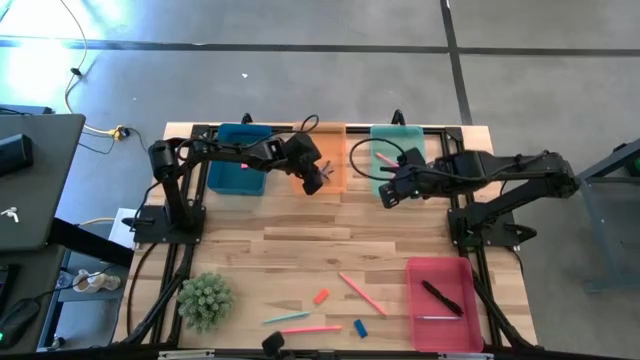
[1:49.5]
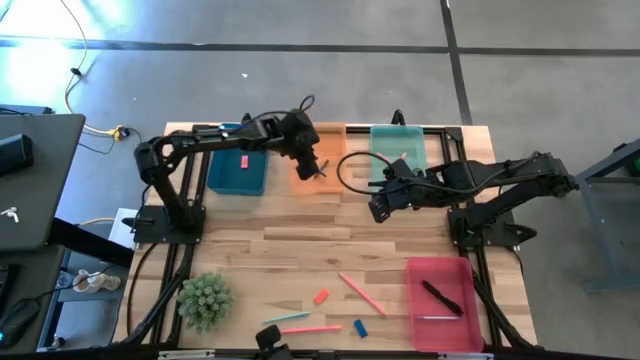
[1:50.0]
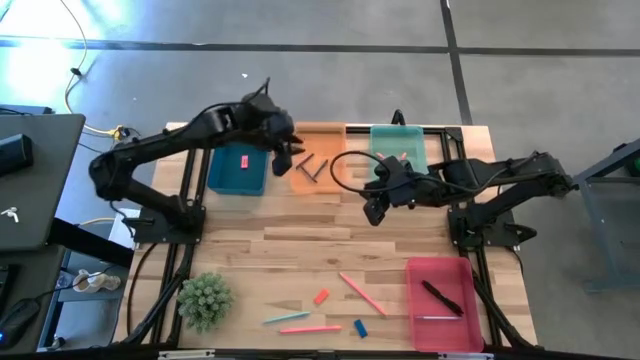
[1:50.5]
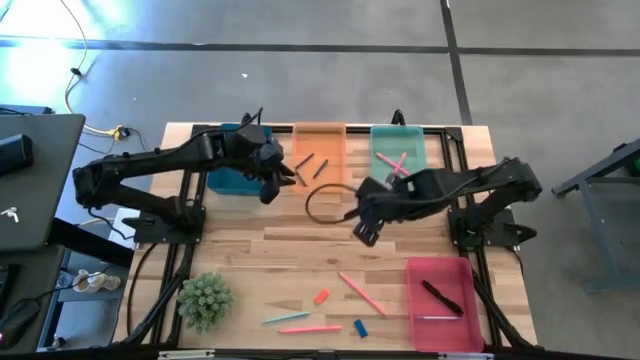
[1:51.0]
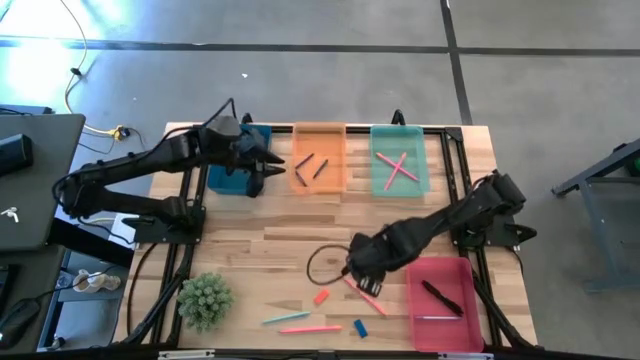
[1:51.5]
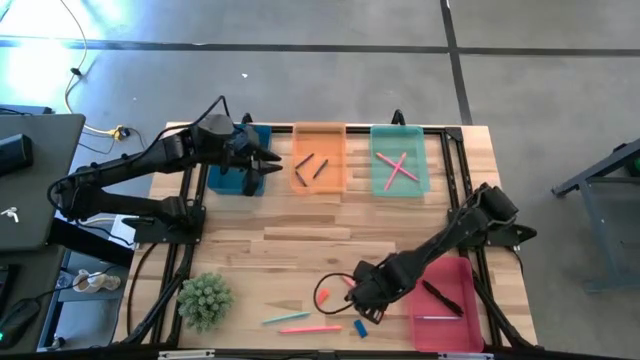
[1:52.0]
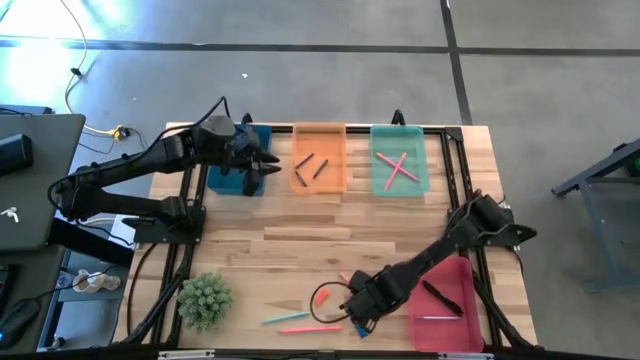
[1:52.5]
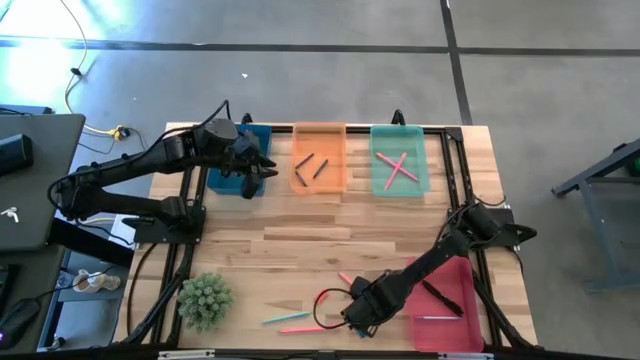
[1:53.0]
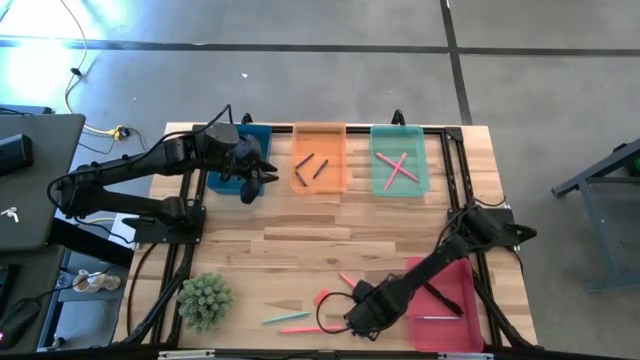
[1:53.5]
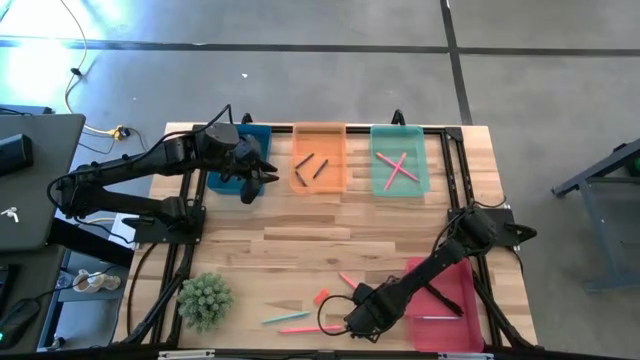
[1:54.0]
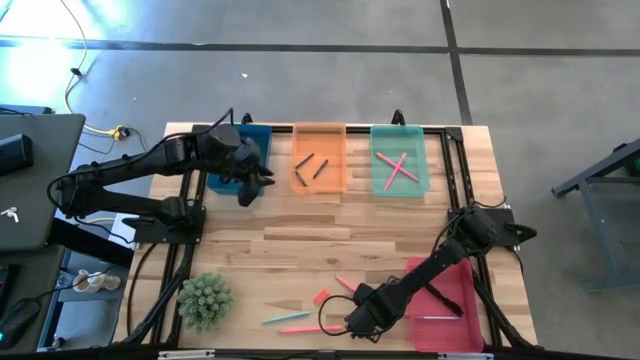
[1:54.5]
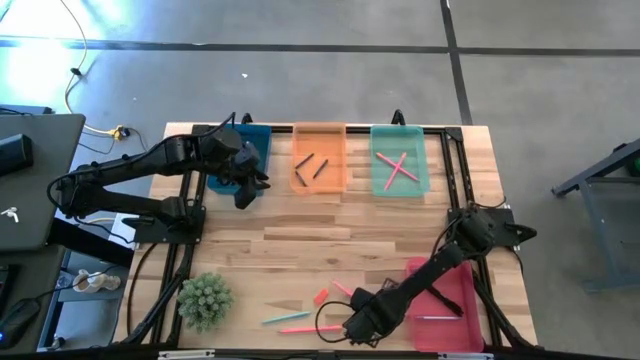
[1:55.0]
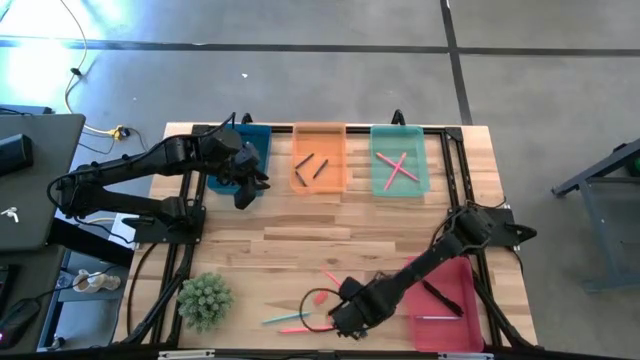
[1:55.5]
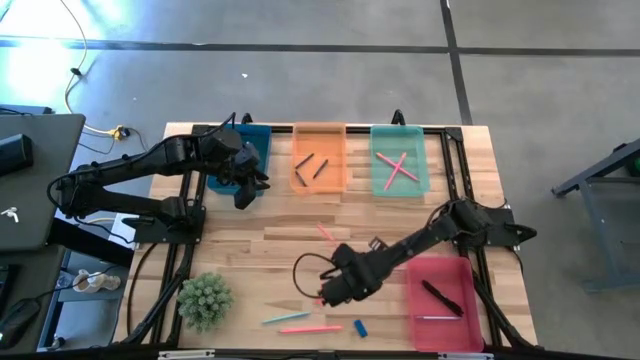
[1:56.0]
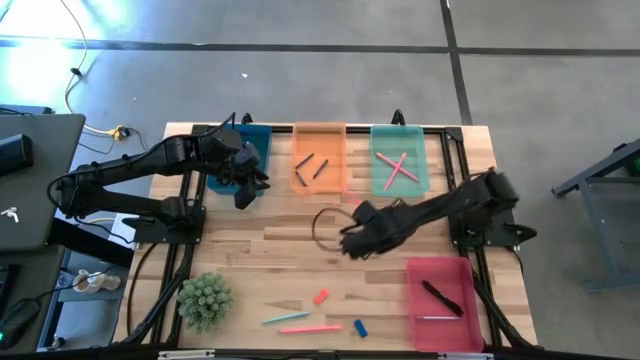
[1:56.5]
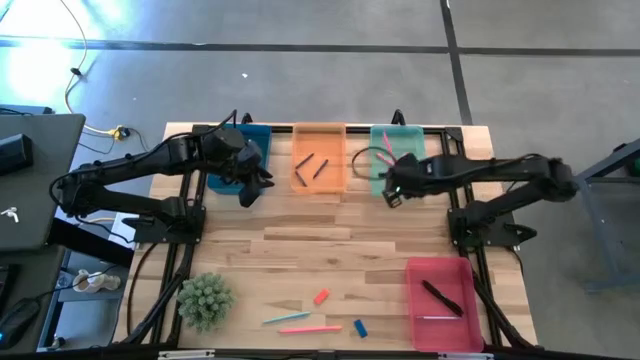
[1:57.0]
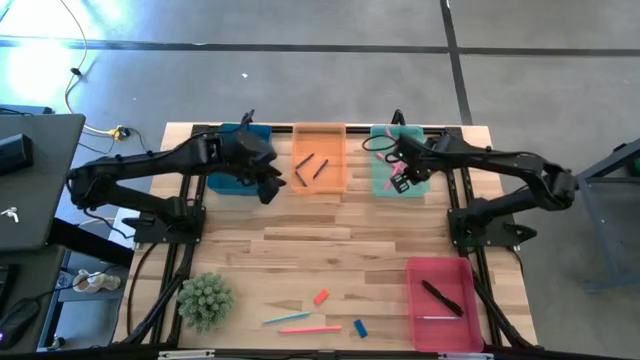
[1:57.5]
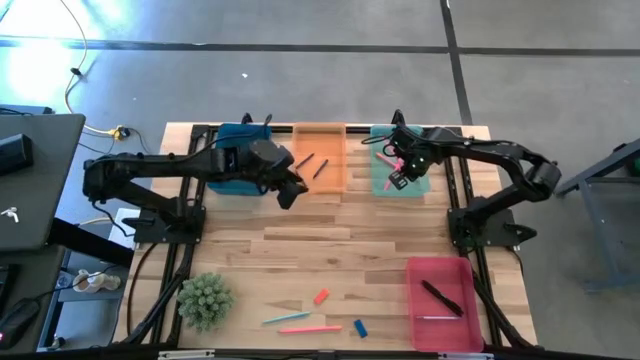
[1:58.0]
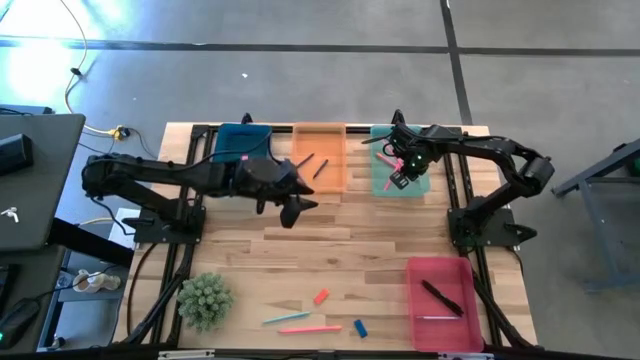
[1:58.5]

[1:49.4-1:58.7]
Task: Sort crayons/erasers/pens/pencils in bins
Put the top pink pencil into the blue bin

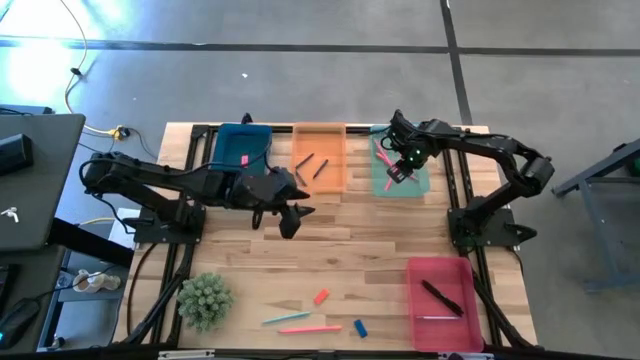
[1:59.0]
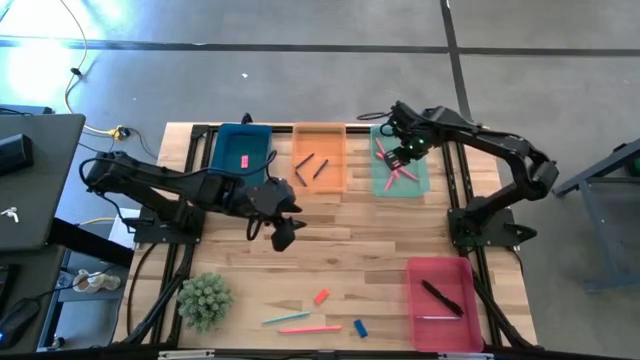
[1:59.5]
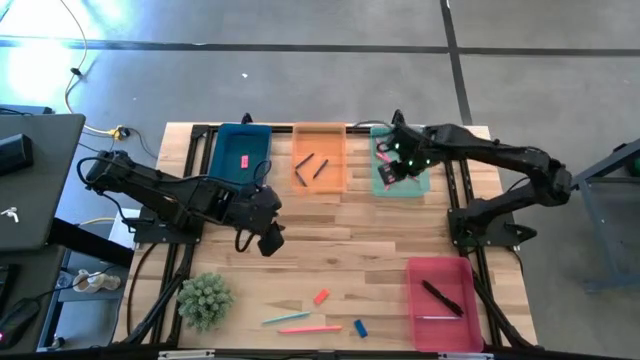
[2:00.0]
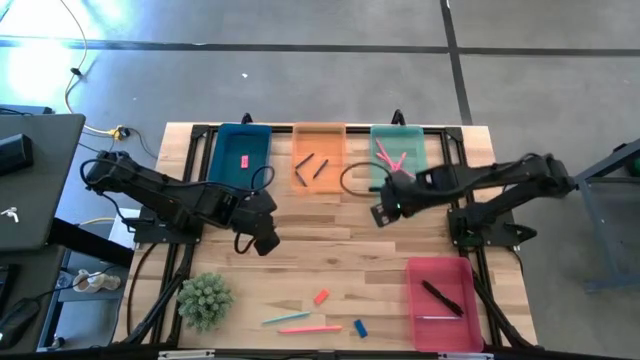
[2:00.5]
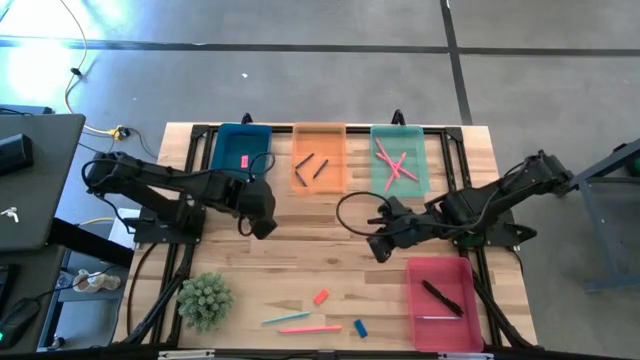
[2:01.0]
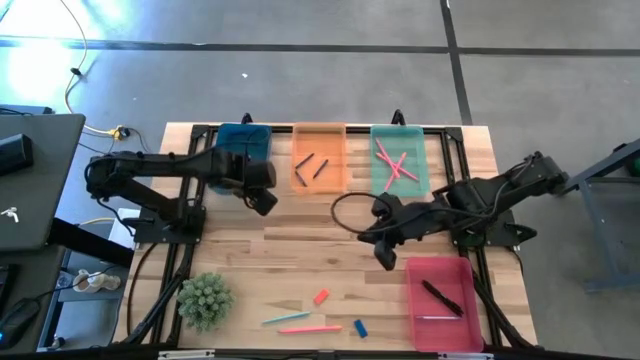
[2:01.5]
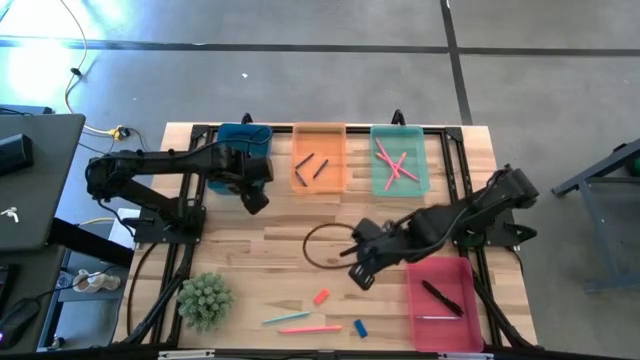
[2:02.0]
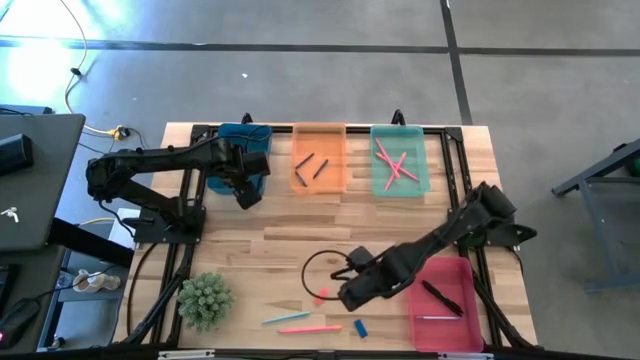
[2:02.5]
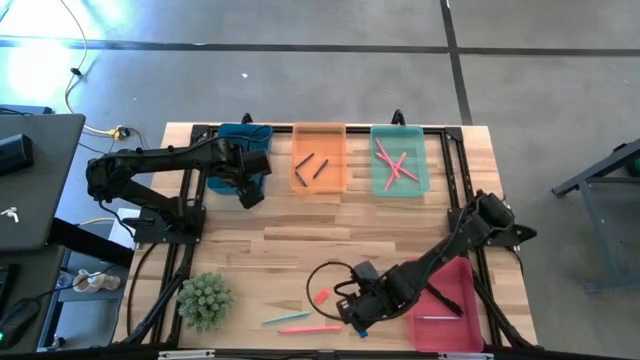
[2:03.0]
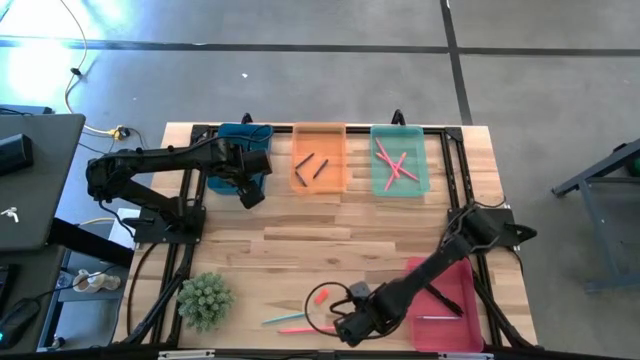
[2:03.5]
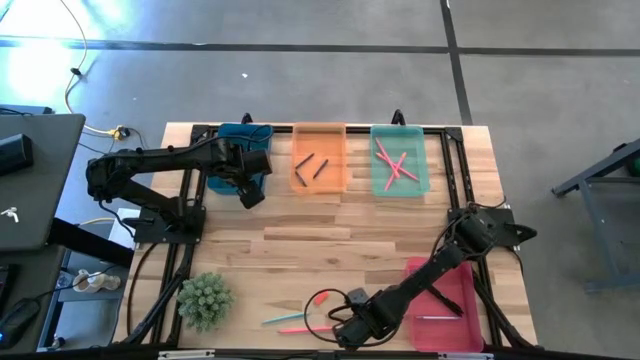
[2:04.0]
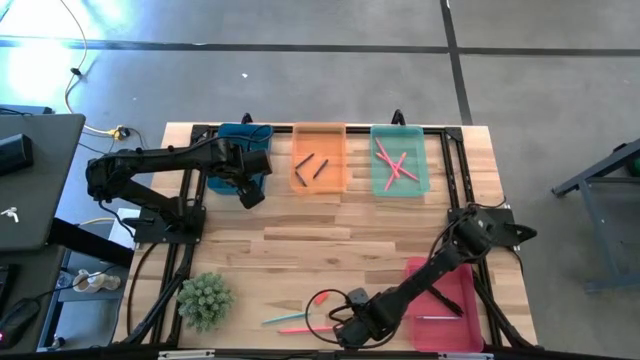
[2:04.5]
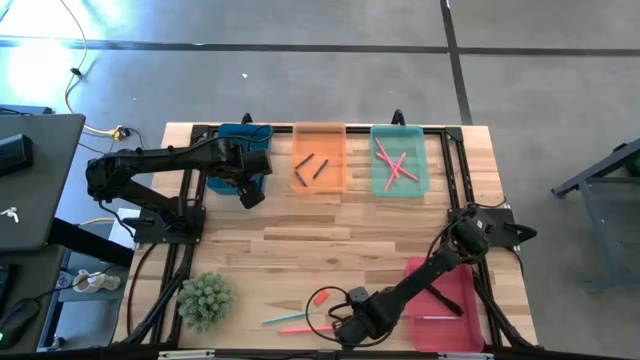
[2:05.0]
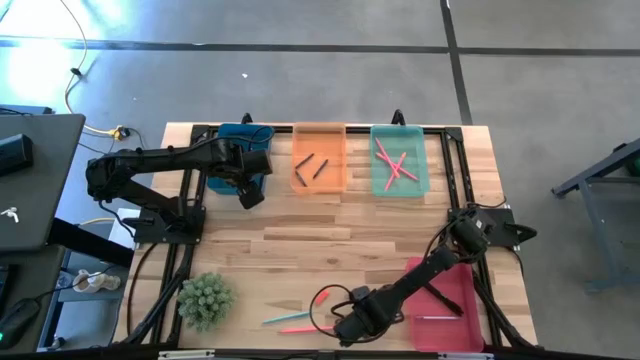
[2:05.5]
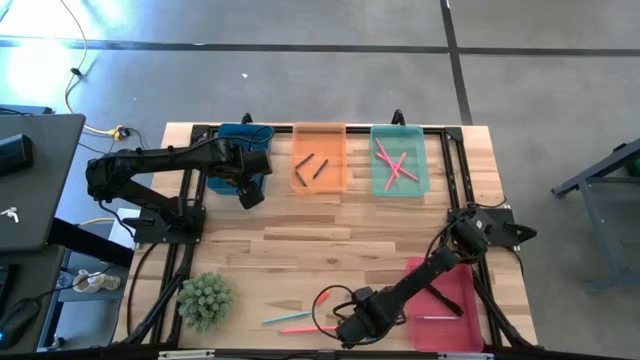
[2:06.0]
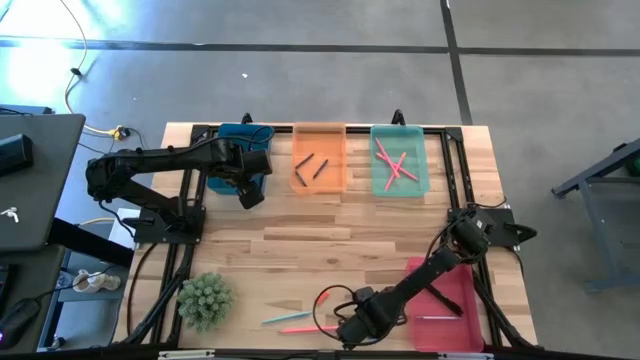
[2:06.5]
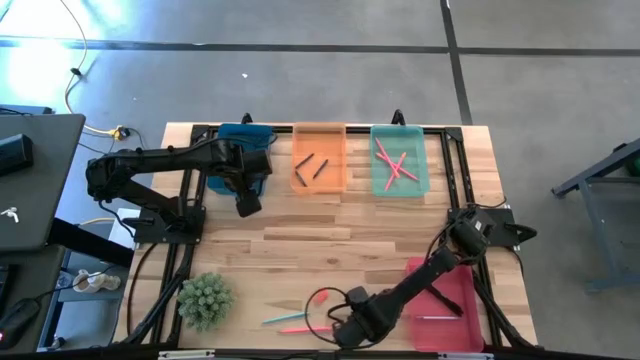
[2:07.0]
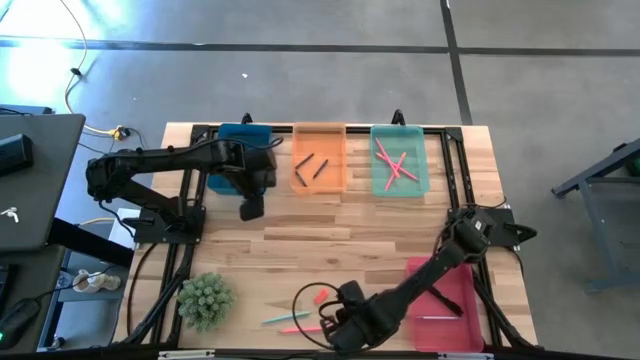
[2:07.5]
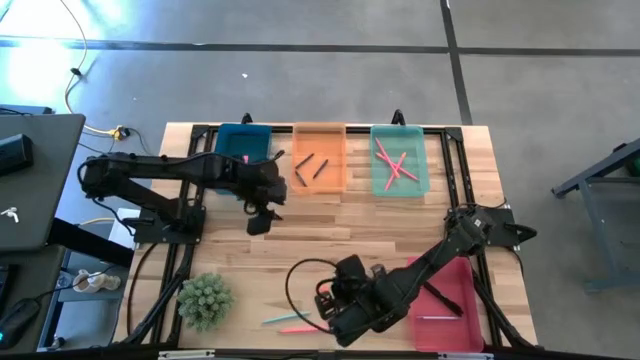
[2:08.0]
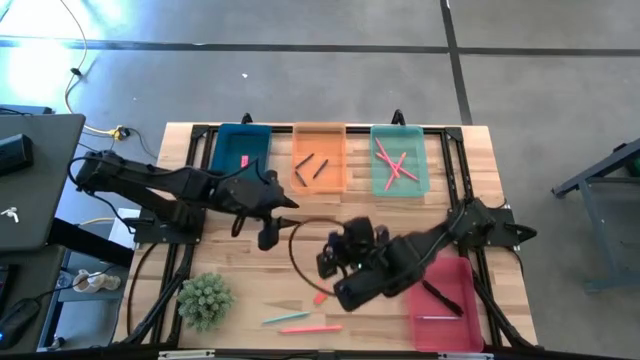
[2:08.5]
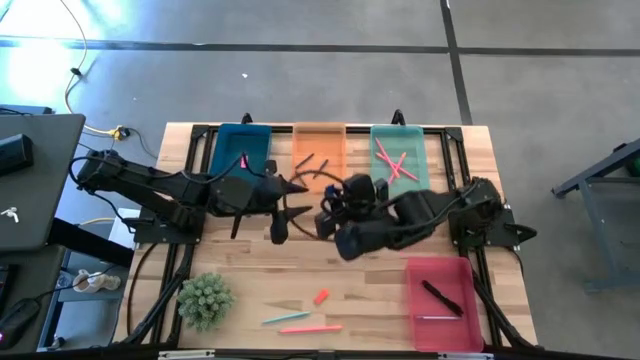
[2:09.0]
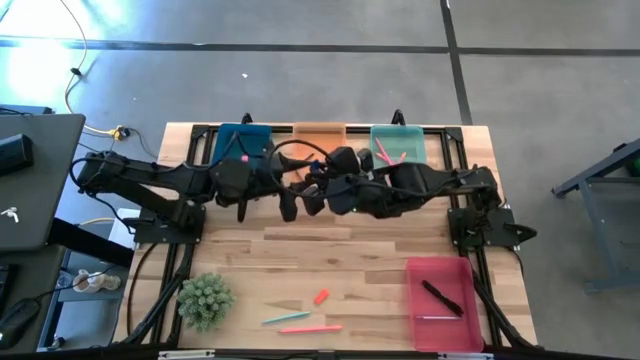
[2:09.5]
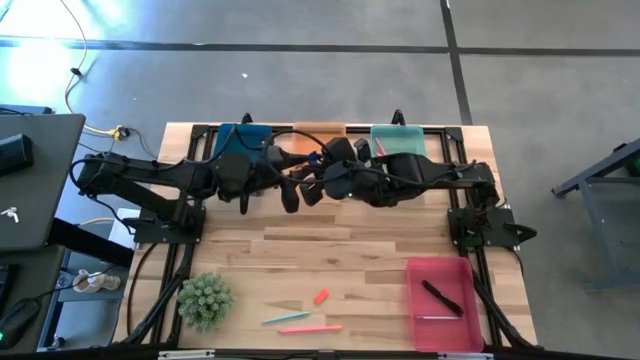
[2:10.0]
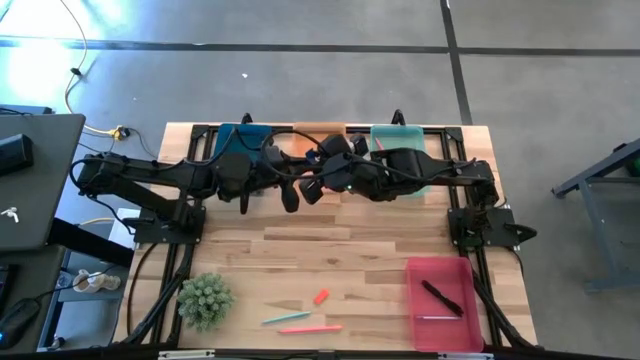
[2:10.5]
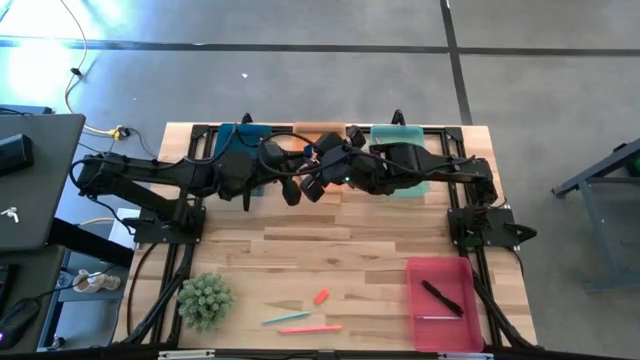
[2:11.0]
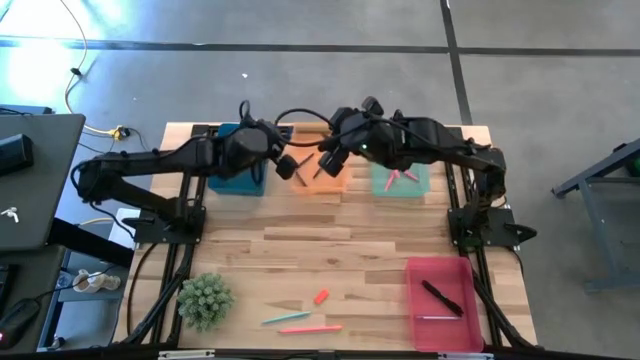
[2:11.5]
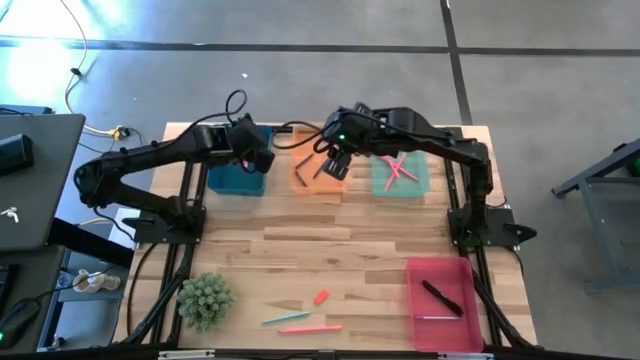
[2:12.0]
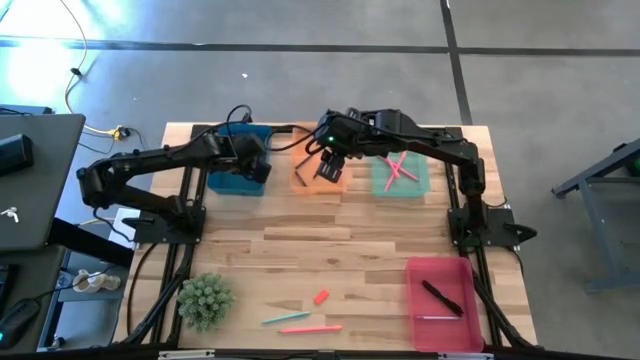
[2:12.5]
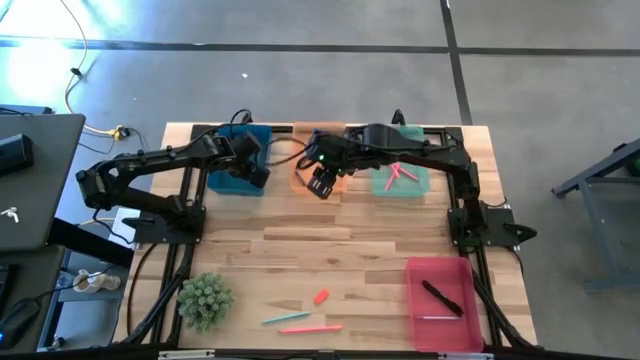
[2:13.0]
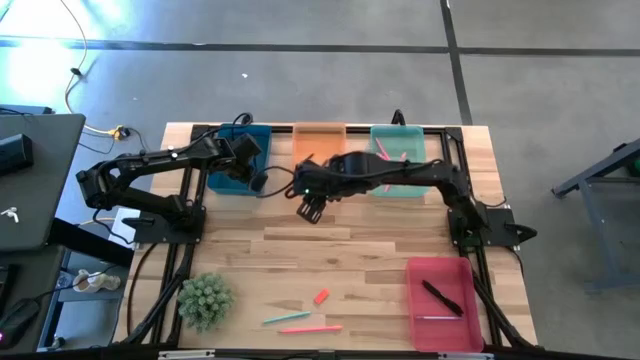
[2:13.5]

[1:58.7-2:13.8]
Put the blue eraser into the dark blue bin
